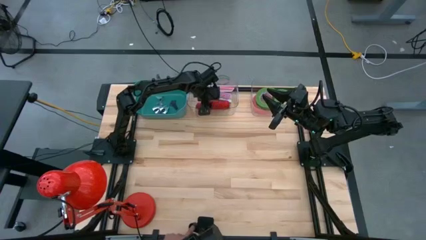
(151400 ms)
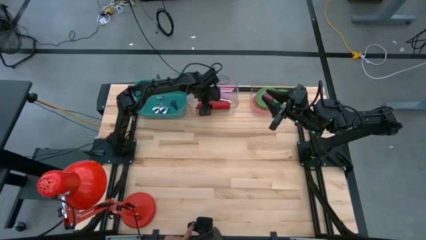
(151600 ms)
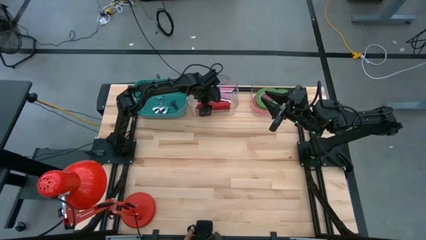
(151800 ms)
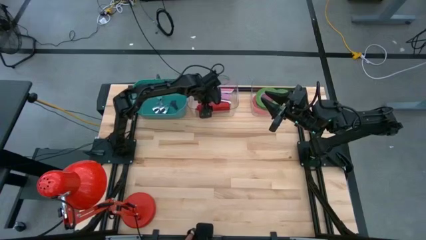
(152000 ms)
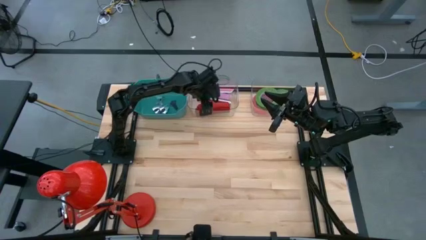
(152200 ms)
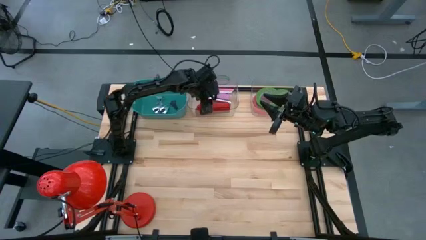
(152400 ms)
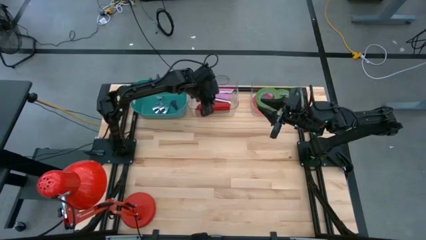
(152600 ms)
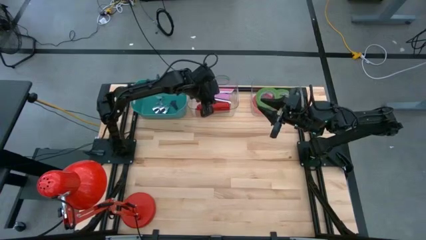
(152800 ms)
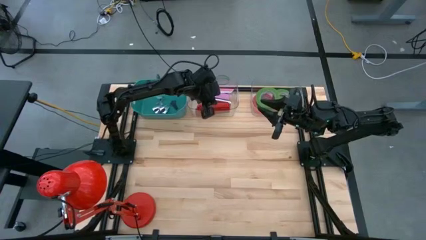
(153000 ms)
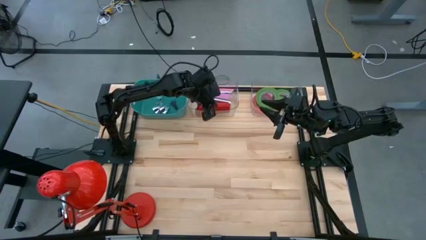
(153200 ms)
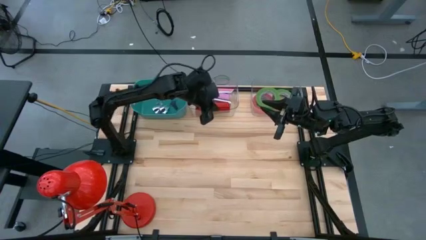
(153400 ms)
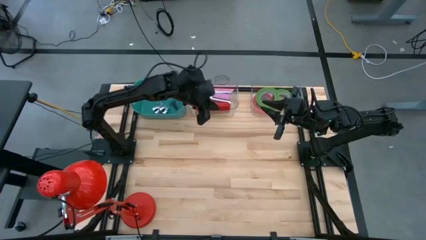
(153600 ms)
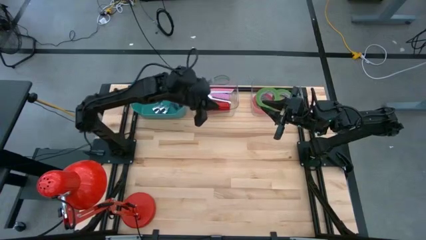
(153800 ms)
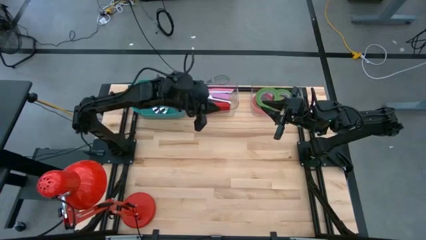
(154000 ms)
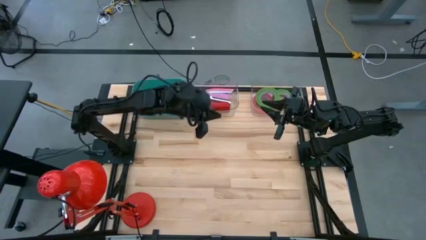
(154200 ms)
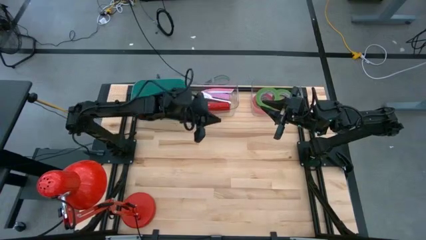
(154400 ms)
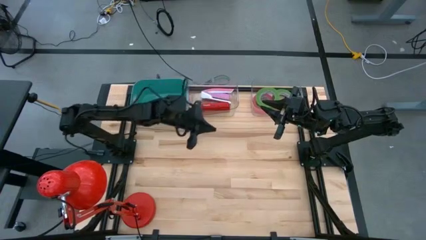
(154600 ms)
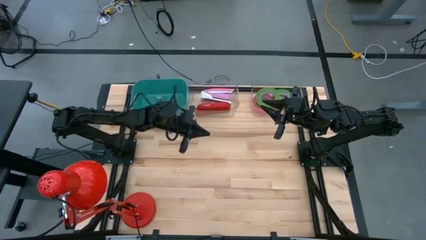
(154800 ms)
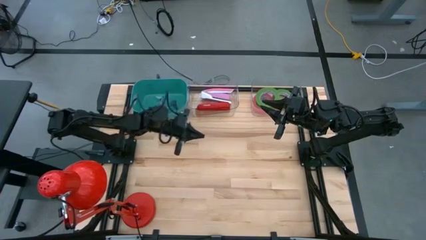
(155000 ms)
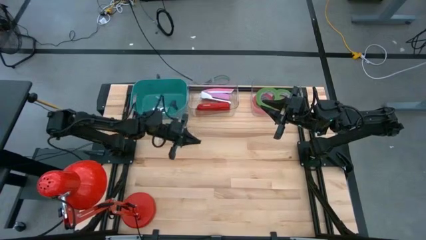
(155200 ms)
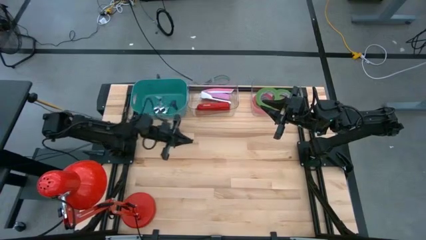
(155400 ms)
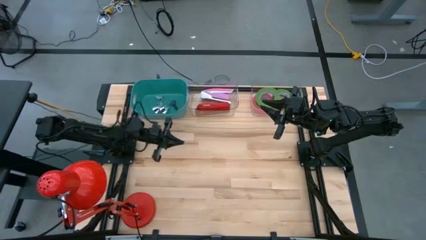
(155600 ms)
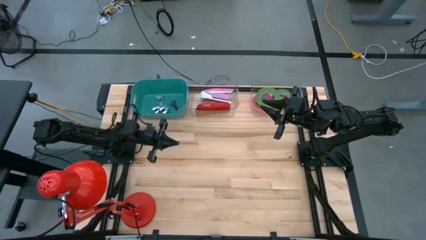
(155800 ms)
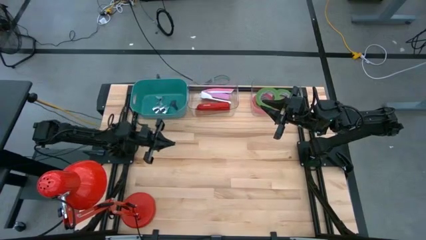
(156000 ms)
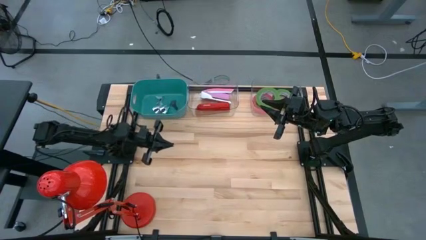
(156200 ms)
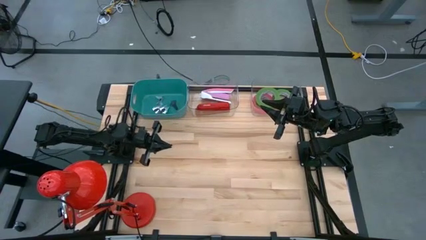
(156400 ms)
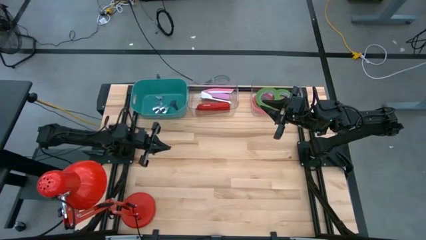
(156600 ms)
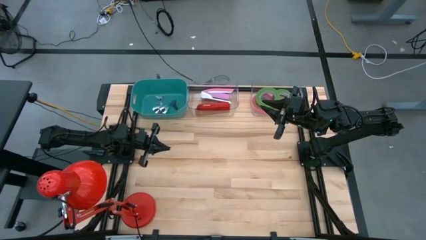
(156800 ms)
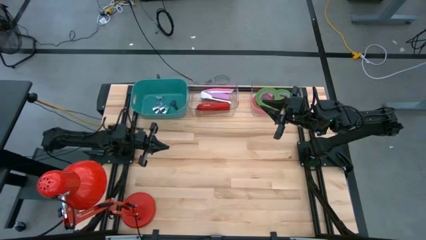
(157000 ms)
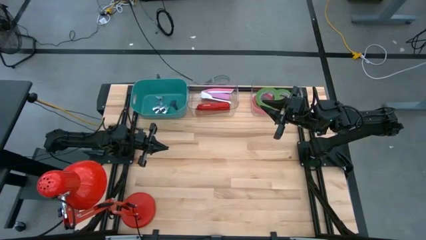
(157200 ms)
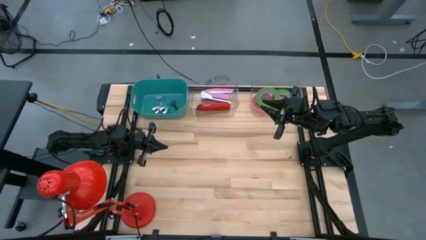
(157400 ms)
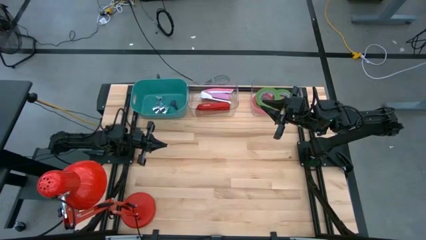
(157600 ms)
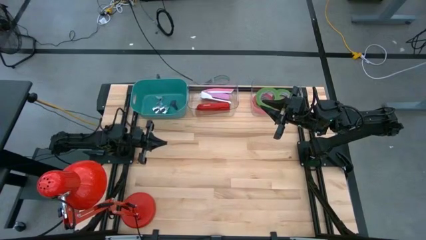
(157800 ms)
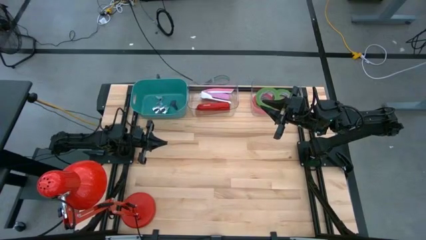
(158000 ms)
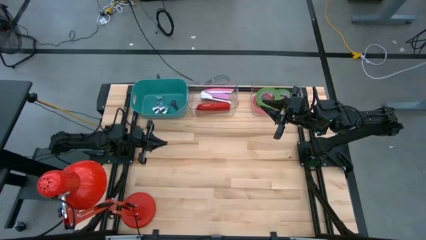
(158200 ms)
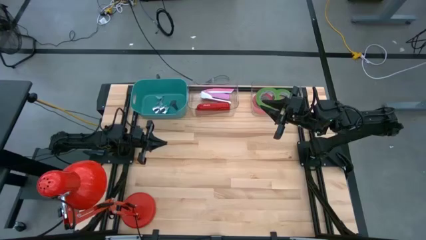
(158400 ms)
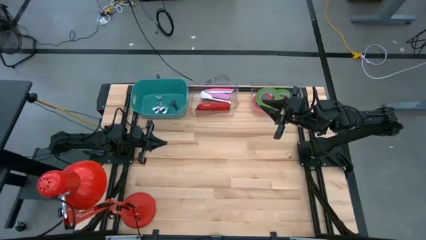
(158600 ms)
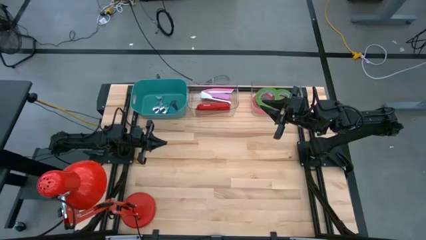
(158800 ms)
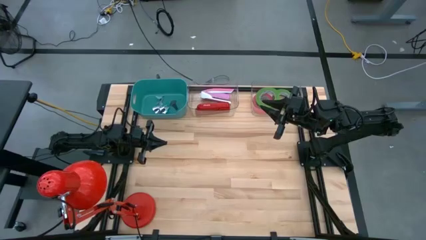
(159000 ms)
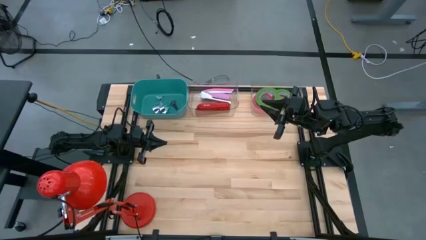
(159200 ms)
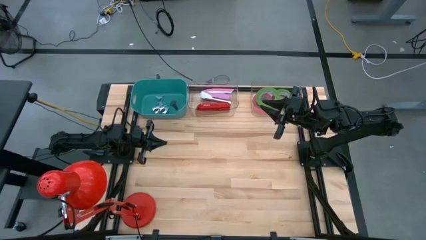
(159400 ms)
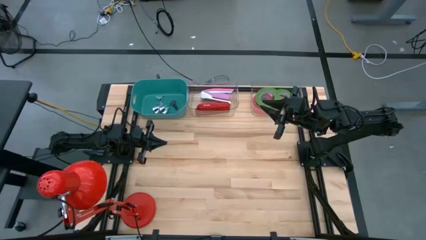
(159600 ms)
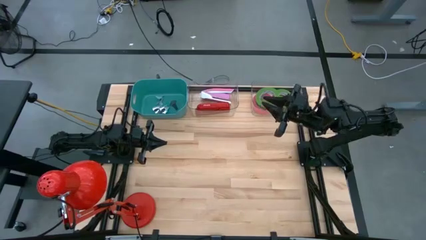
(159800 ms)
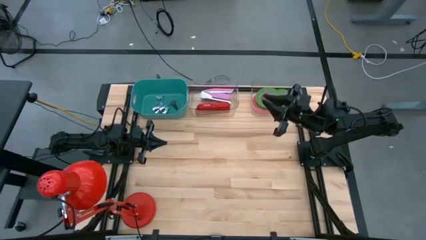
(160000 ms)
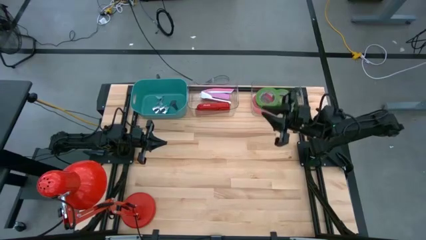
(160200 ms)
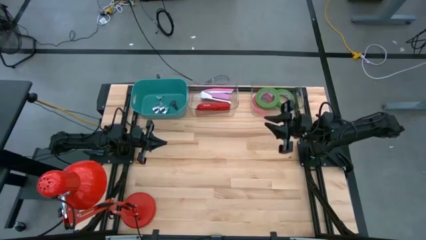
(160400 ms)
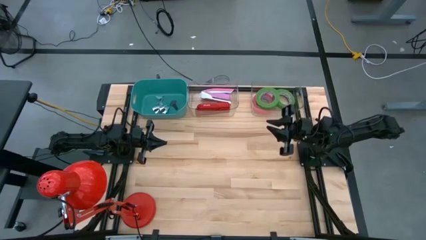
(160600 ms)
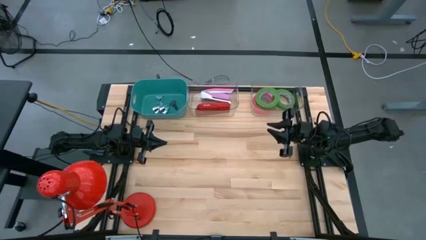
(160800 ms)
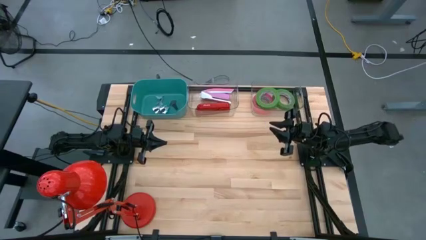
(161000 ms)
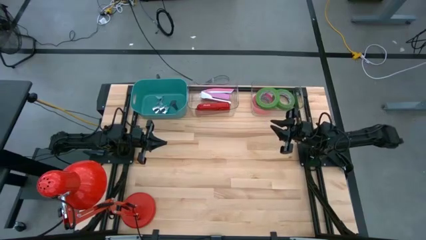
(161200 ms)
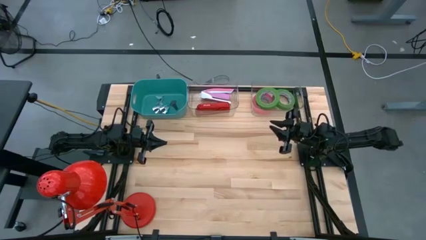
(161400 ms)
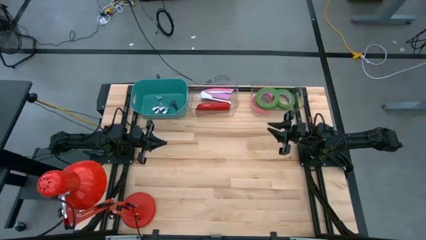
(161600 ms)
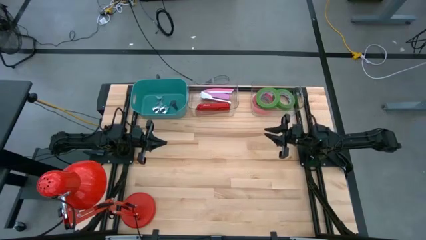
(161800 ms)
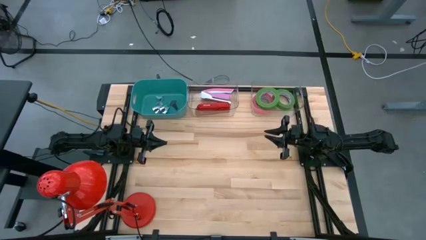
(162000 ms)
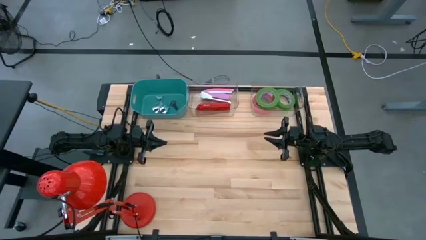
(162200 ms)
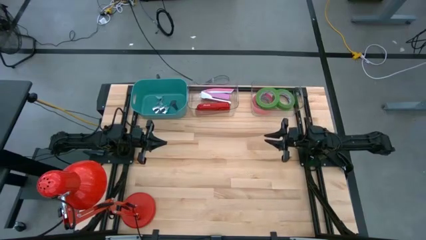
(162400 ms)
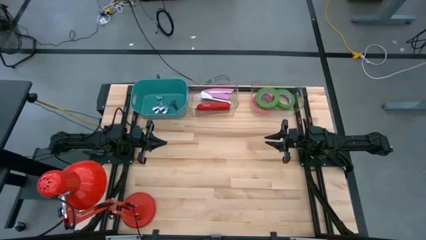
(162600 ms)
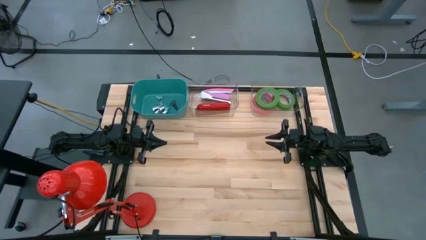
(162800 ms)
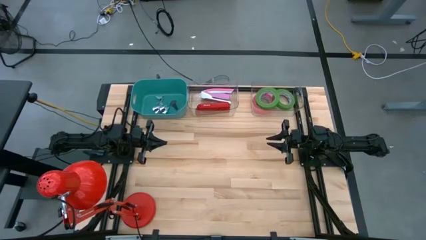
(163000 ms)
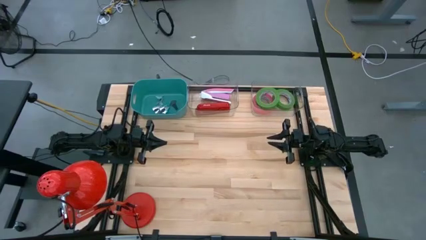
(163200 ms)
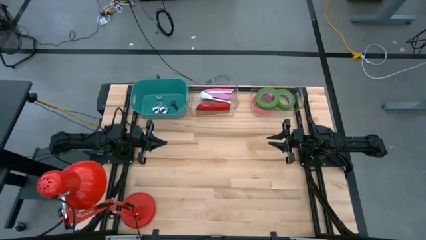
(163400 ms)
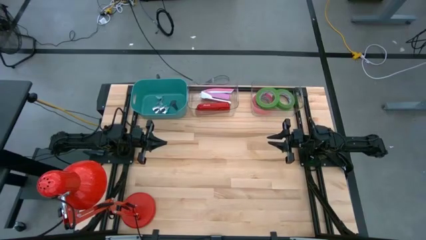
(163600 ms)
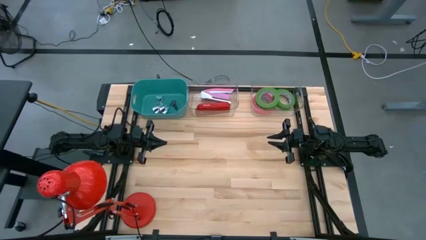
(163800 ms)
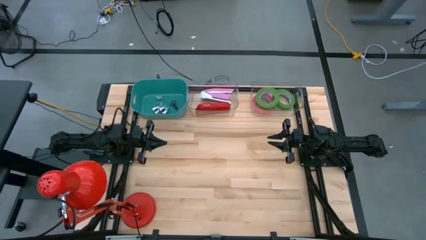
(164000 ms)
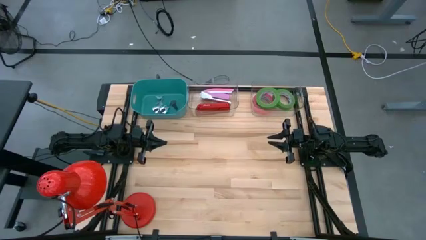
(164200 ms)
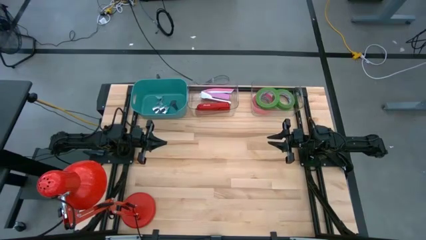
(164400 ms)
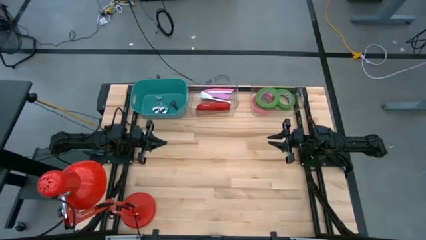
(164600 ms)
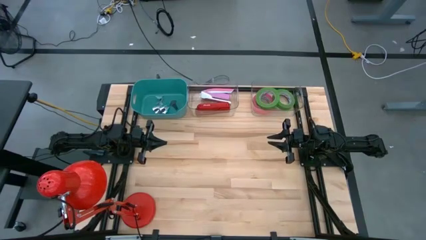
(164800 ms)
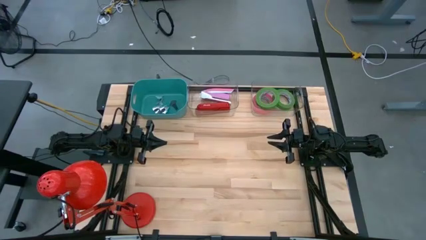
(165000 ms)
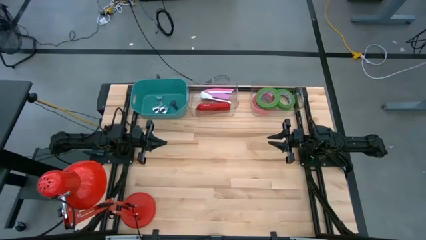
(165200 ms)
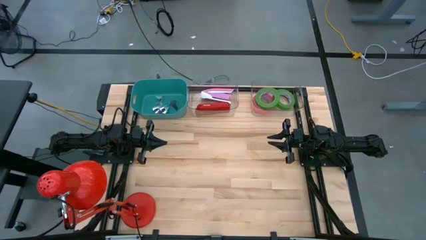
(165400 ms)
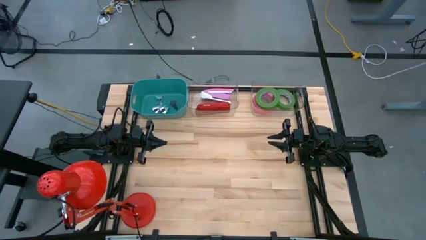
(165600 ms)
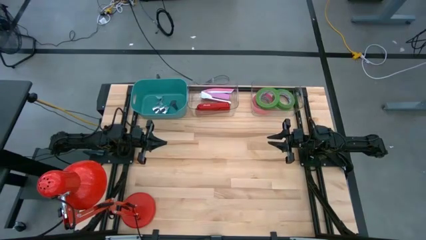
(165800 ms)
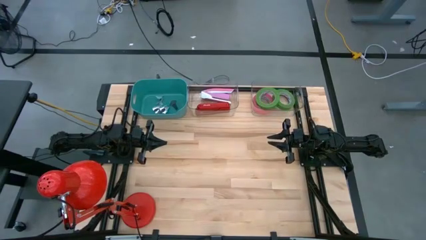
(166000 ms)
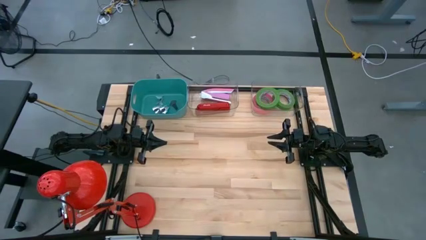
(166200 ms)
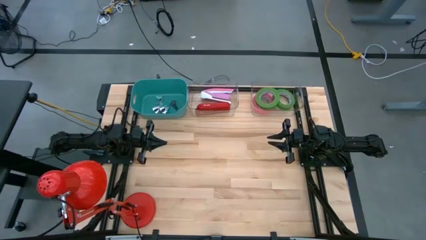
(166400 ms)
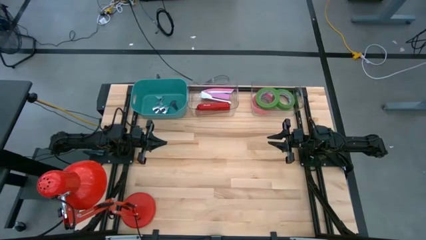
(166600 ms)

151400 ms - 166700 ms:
Task: Pick and place Stapler, Stapler remover, tape
Return to Home Position
